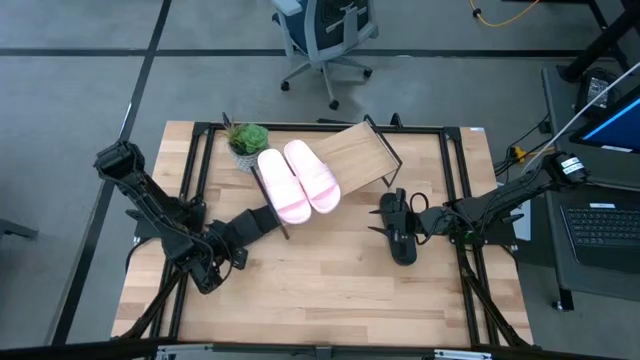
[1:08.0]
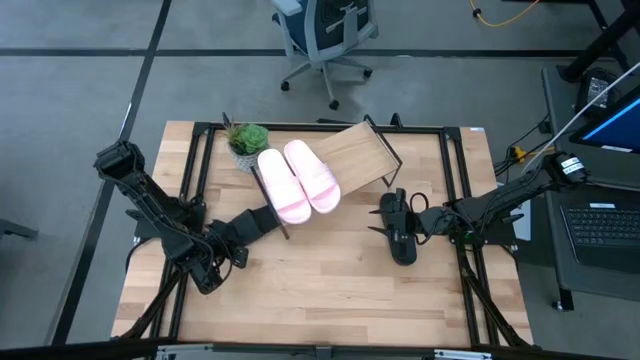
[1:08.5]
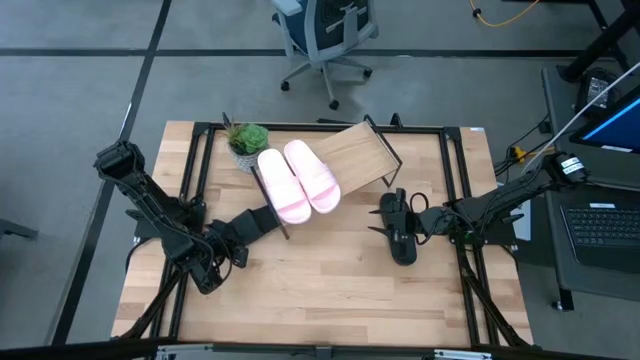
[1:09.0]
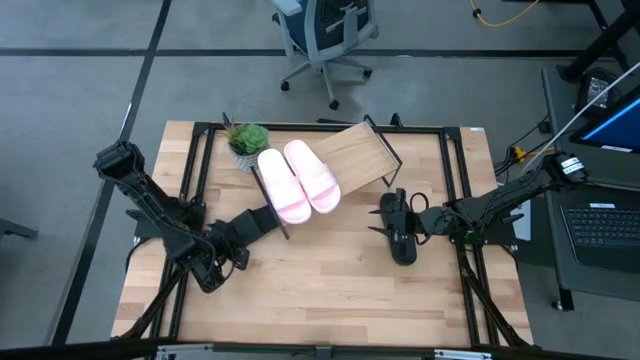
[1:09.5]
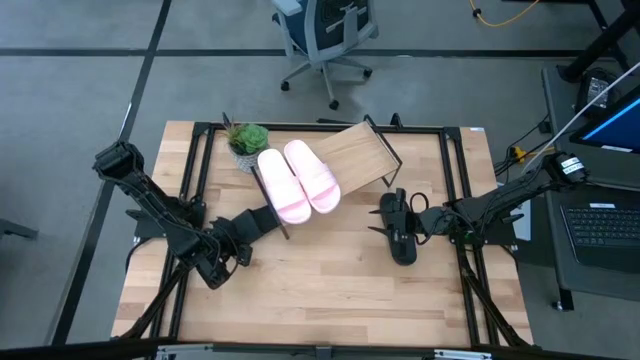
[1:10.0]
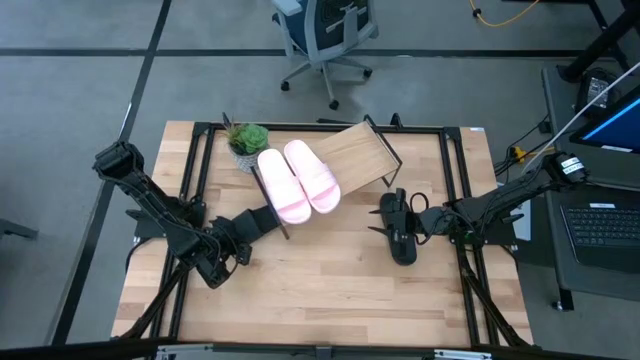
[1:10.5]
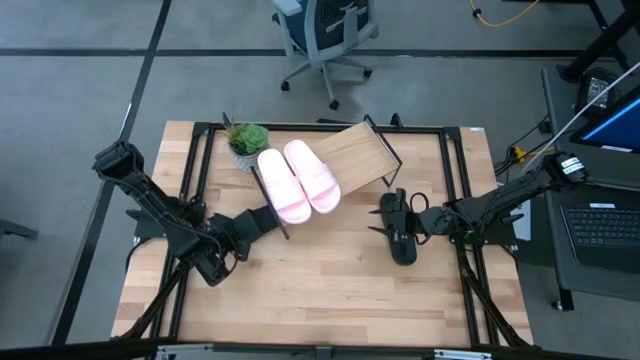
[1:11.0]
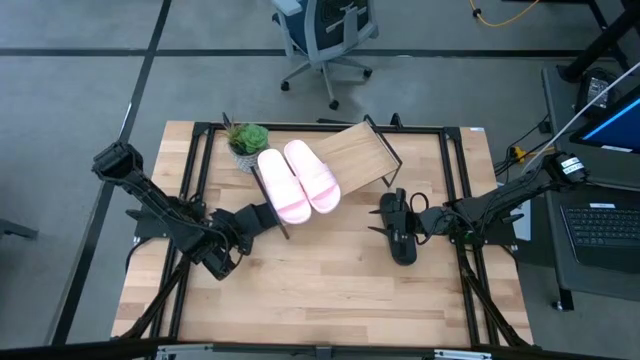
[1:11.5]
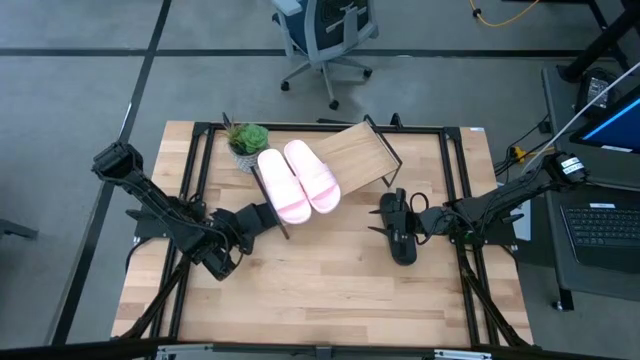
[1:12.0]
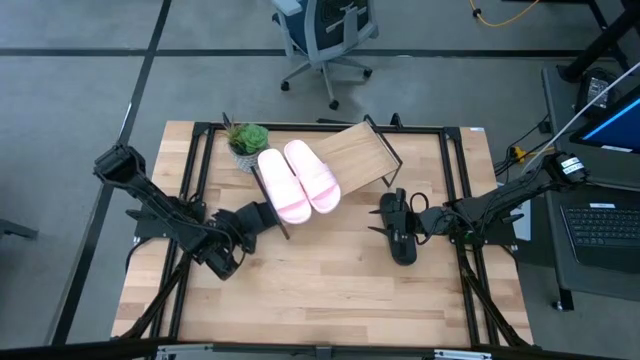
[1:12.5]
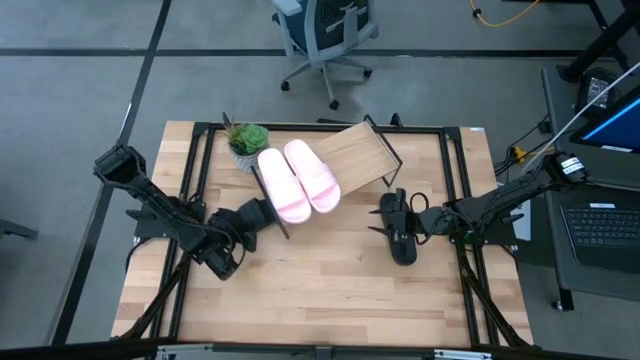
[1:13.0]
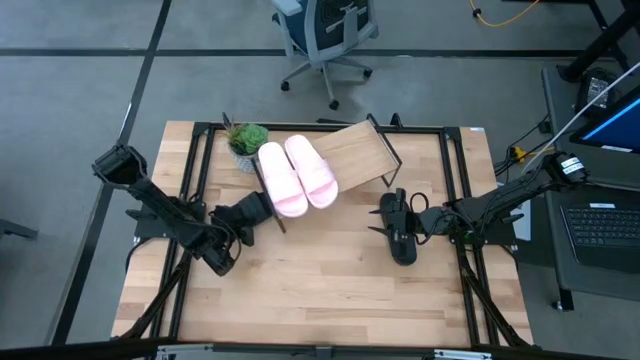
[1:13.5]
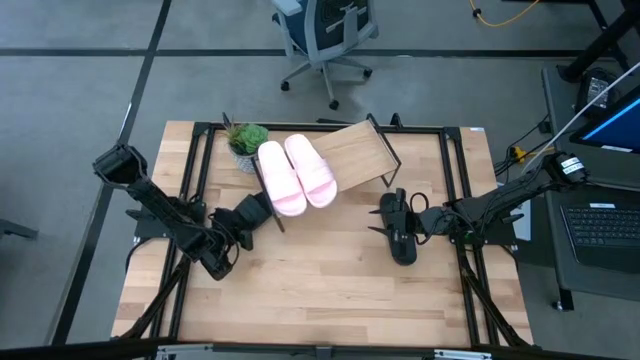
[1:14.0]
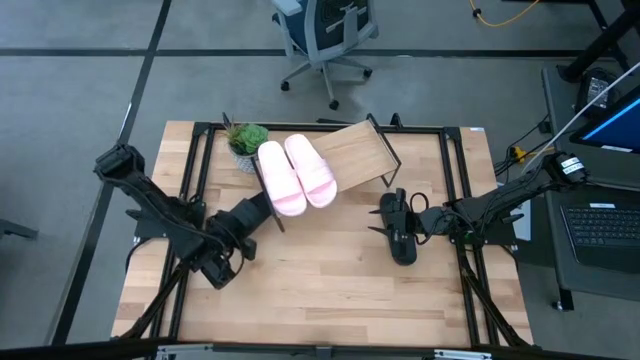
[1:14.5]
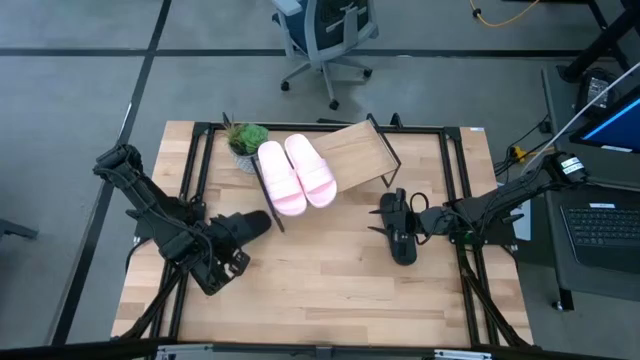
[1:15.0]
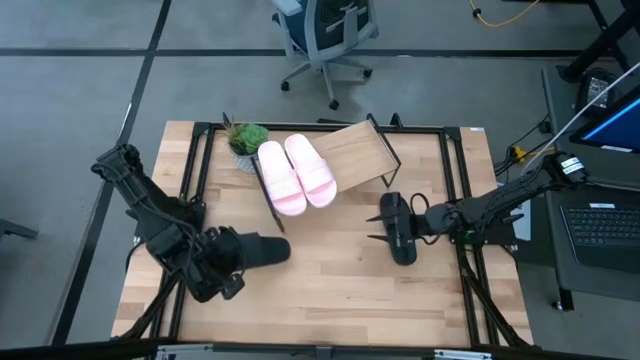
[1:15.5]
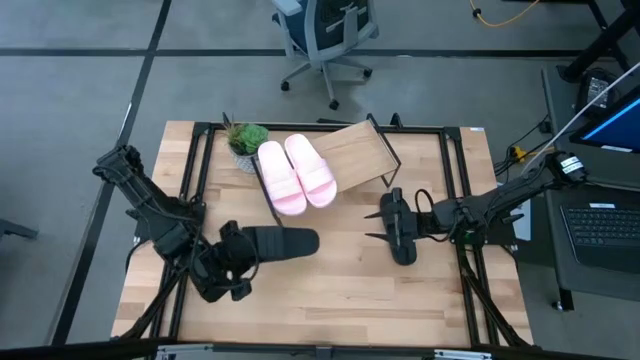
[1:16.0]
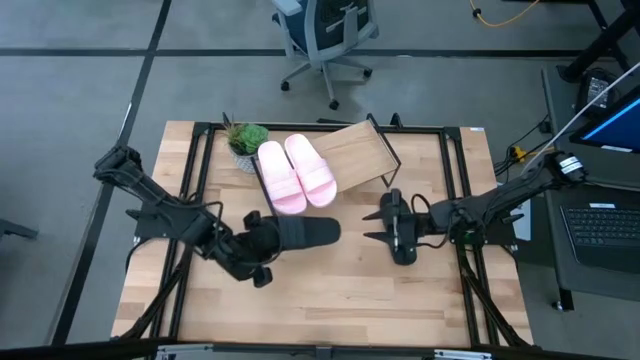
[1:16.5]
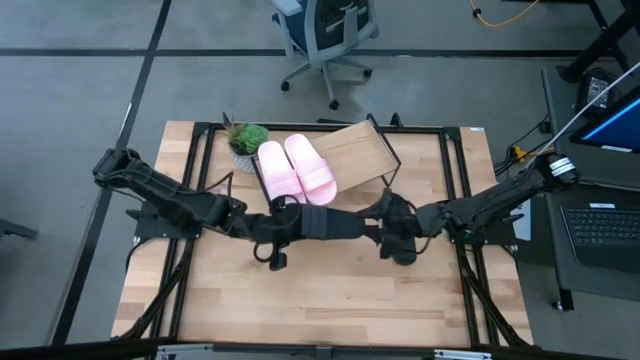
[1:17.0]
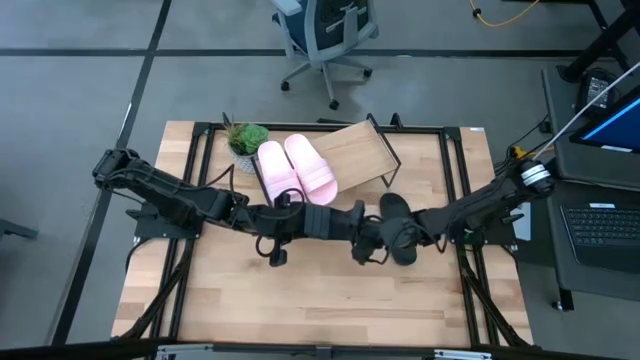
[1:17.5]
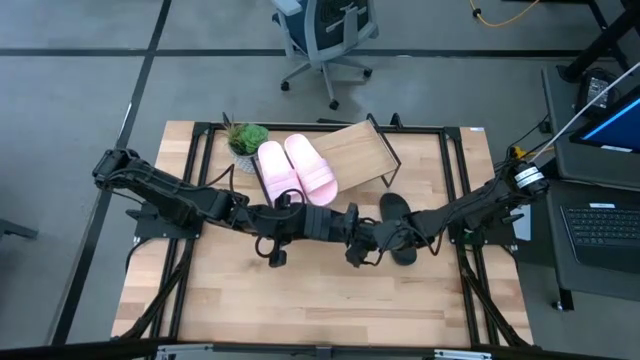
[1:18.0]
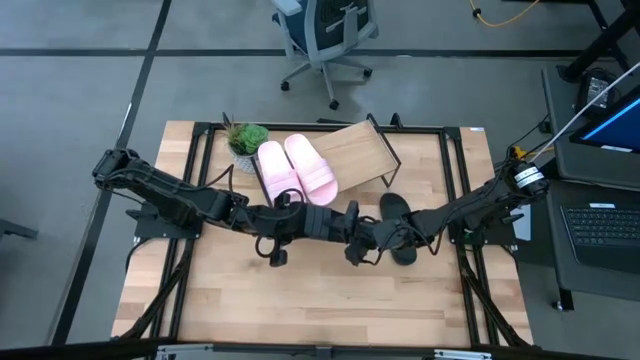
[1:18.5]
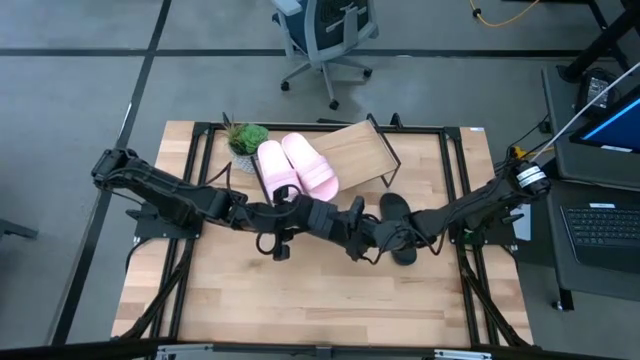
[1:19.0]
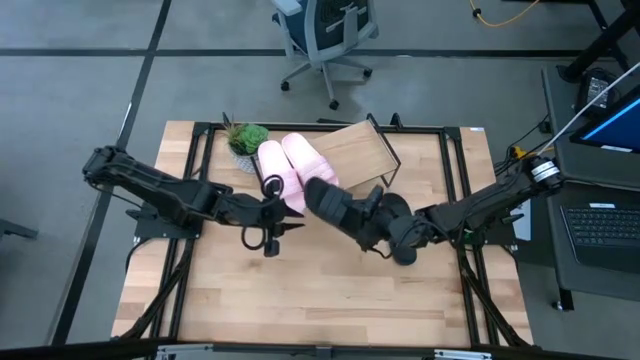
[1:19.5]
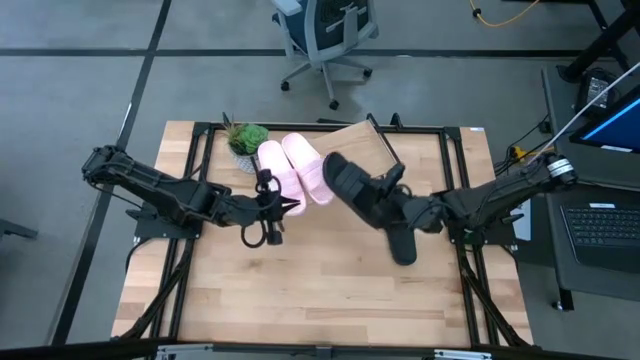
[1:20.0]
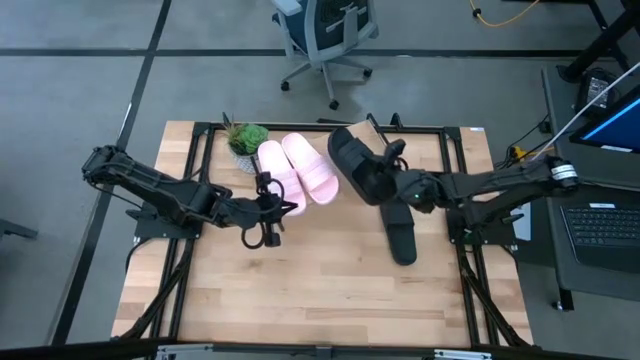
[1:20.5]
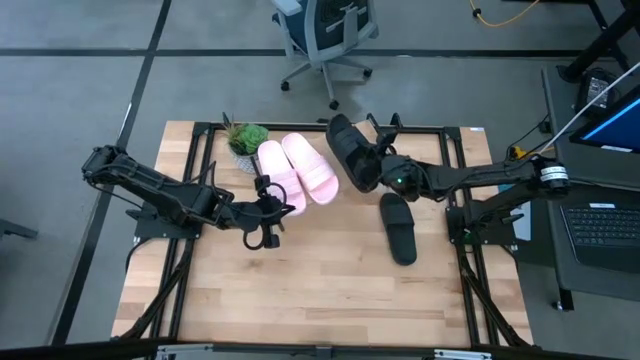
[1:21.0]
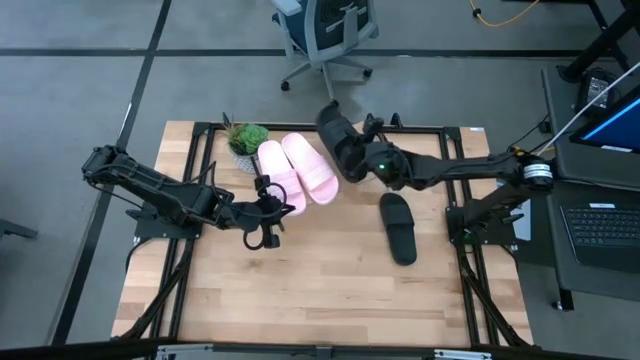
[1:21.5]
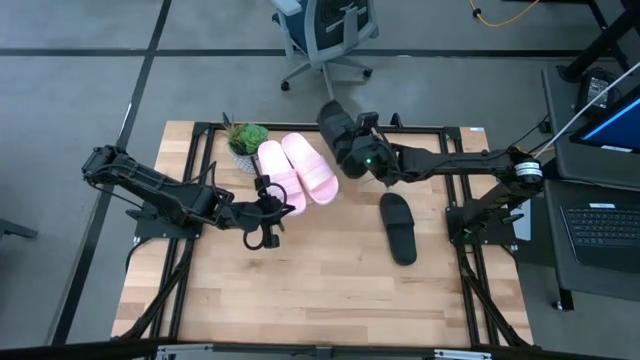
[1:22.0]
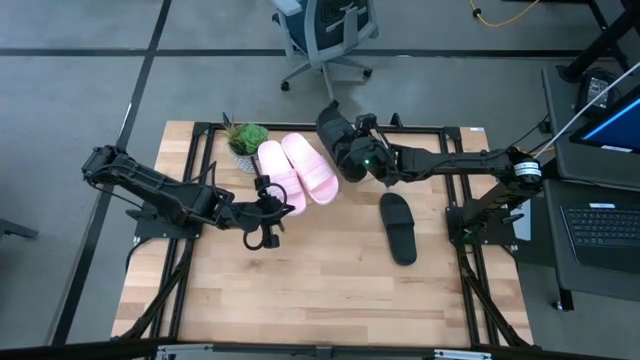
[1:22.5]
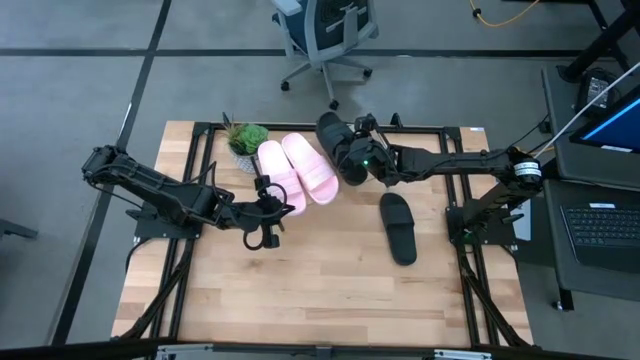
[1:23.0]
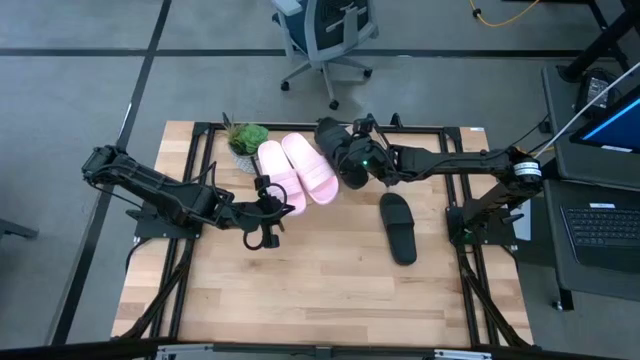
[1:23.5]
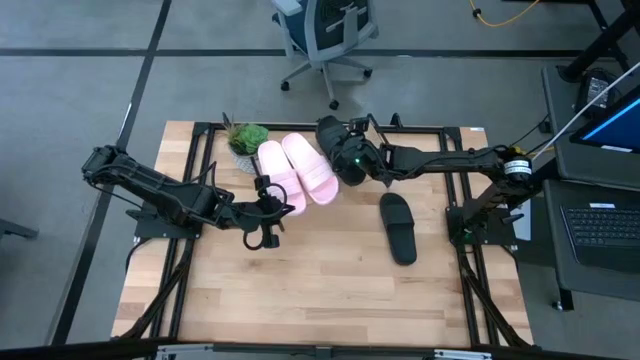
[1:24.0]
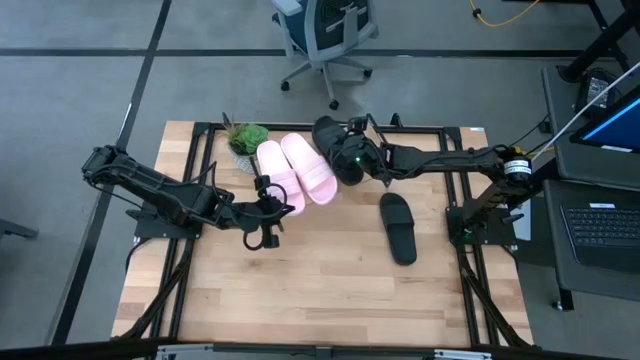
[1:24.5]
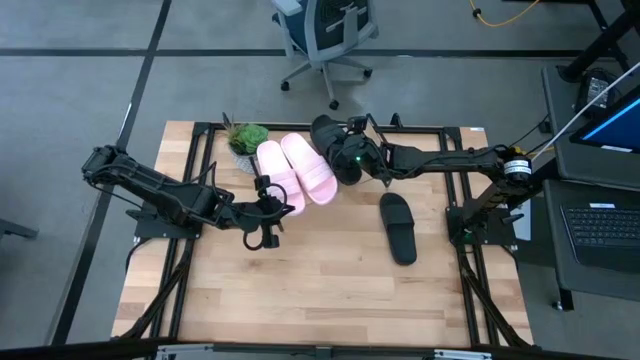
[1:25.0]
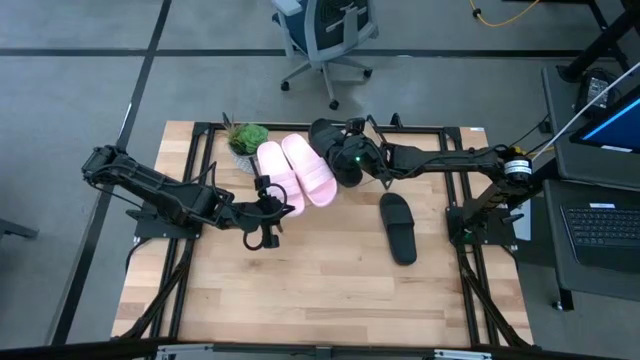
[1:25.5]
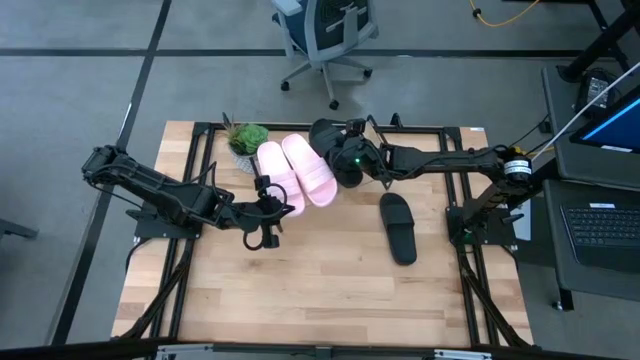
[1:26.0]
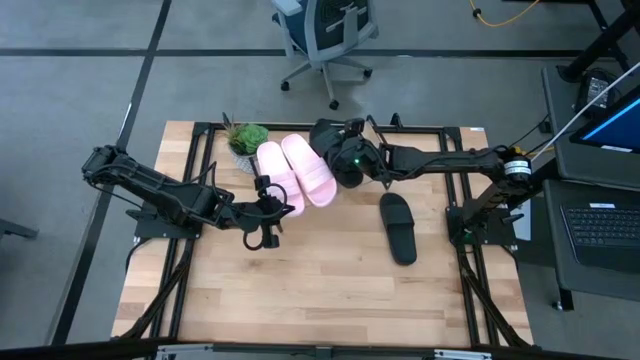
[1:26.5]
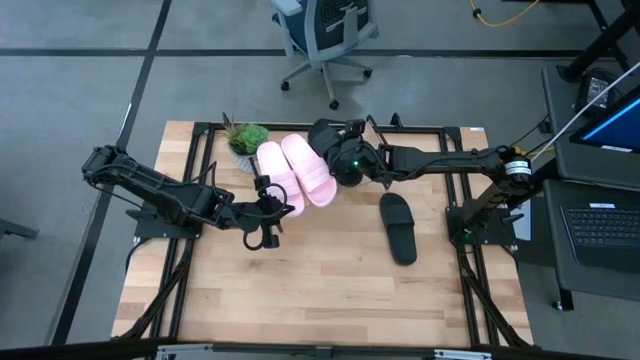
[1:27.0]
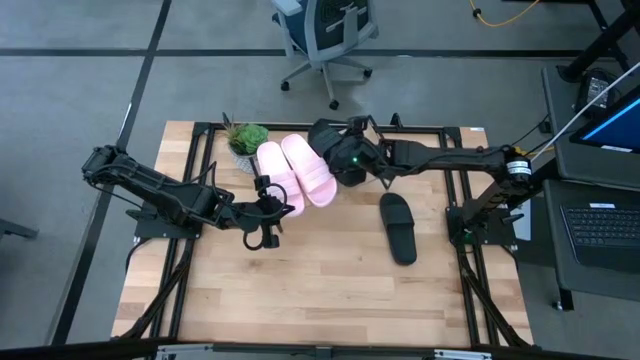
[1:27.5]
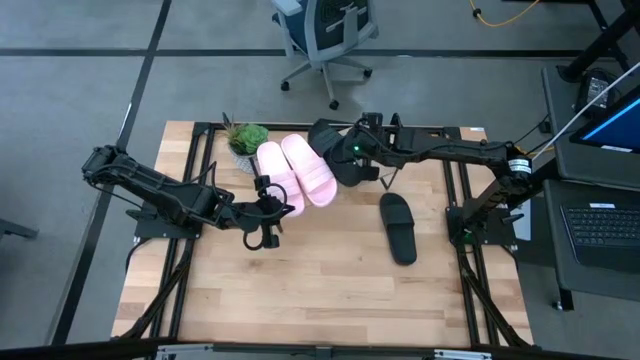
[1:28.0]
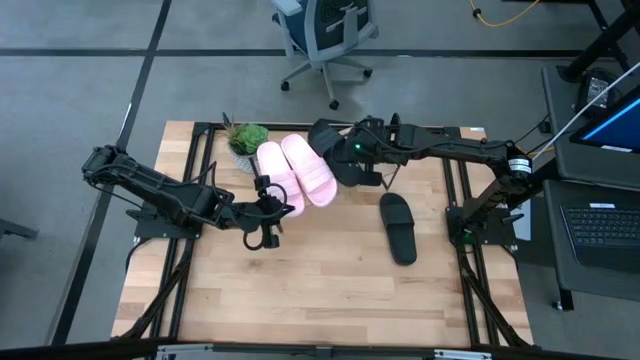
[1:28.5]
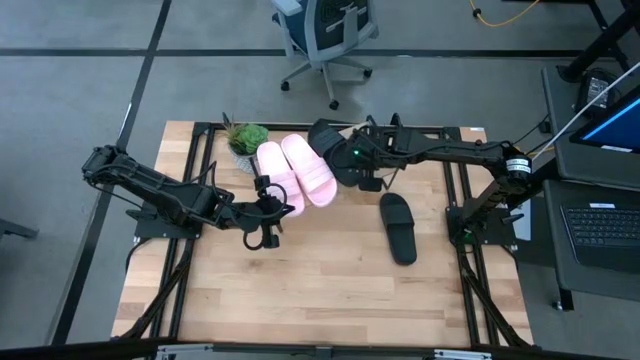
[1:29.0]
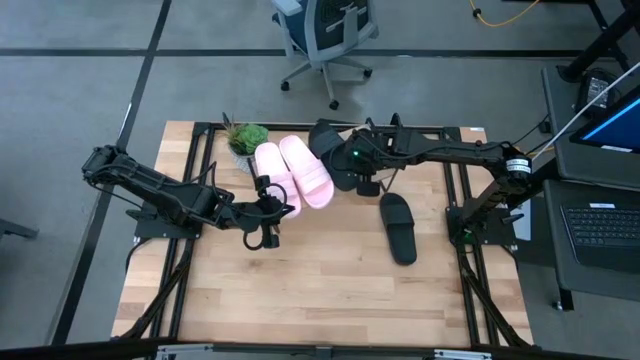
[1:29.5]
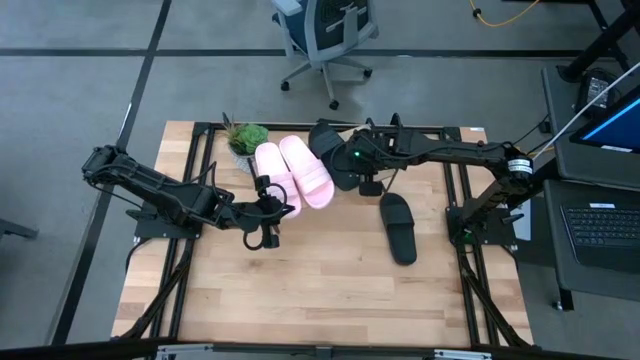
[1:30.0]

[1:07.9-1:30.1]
Task: Pick and place slides into the shelf
Put the left black slide on the shelf
